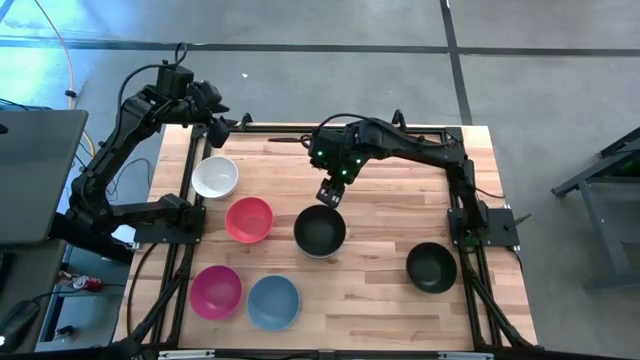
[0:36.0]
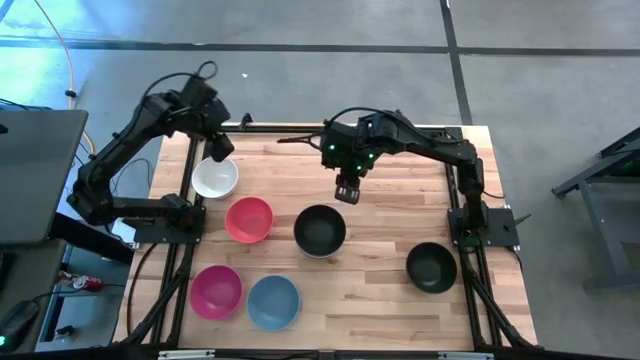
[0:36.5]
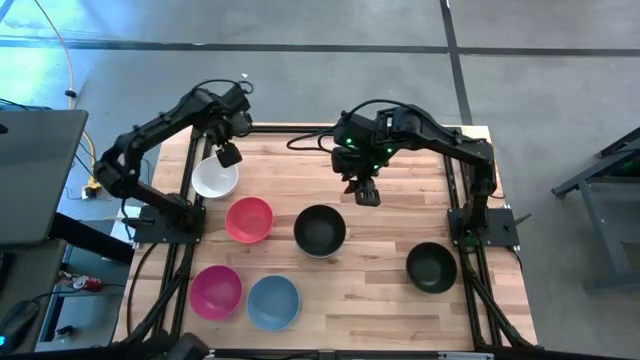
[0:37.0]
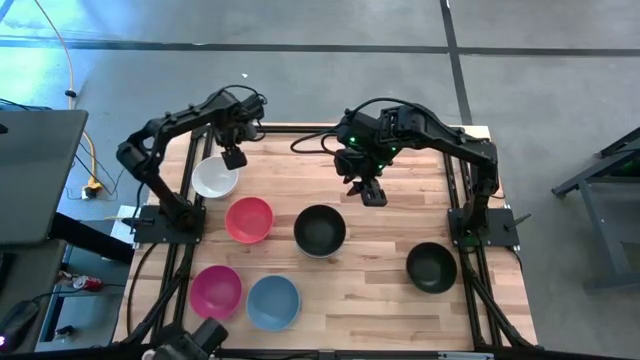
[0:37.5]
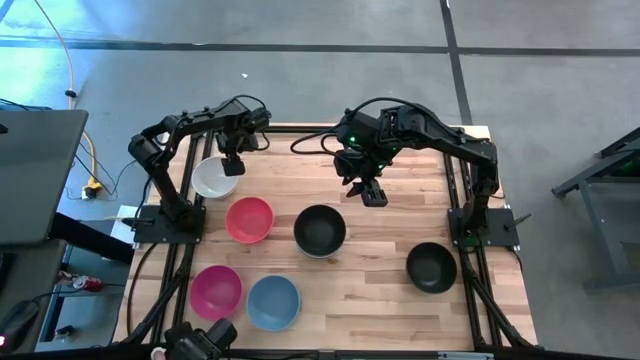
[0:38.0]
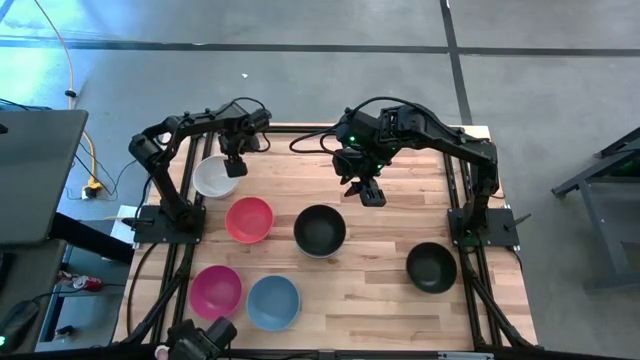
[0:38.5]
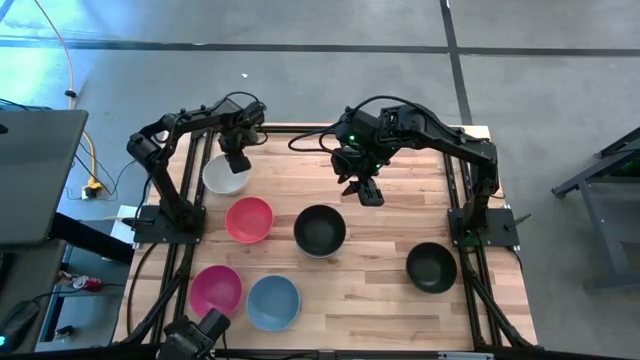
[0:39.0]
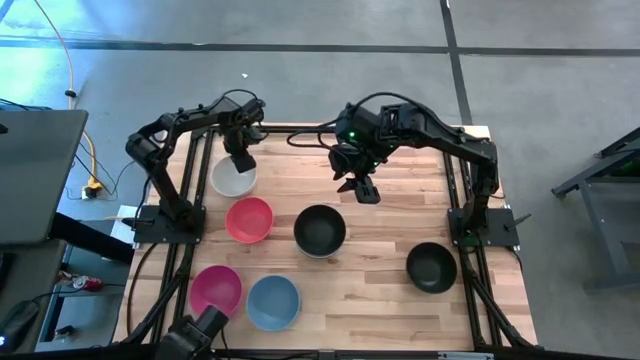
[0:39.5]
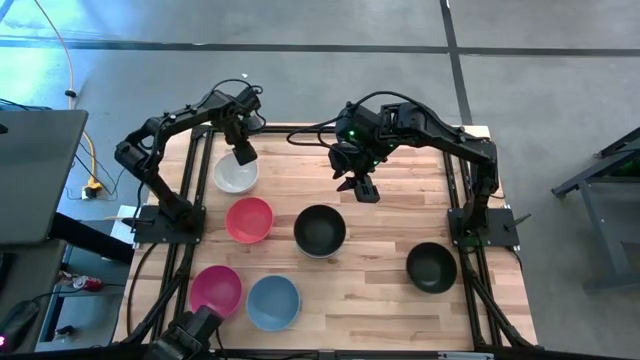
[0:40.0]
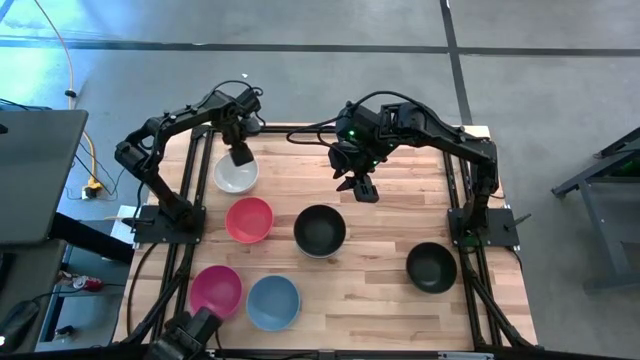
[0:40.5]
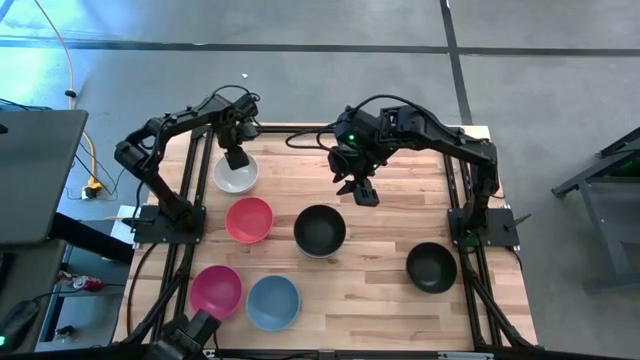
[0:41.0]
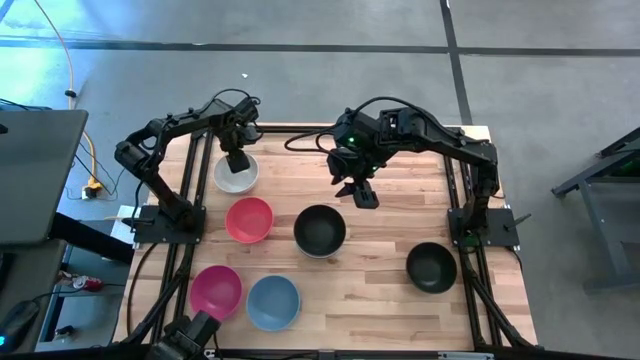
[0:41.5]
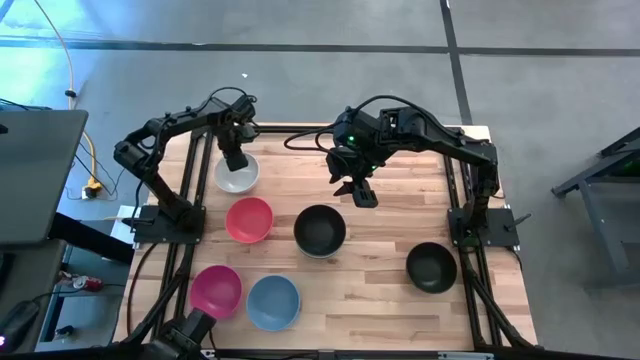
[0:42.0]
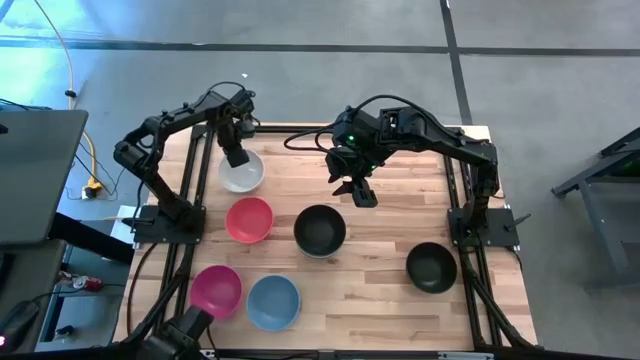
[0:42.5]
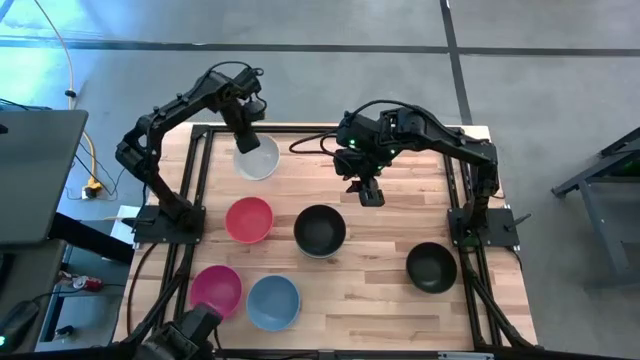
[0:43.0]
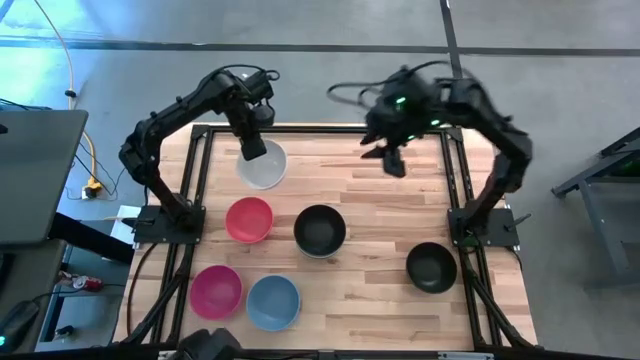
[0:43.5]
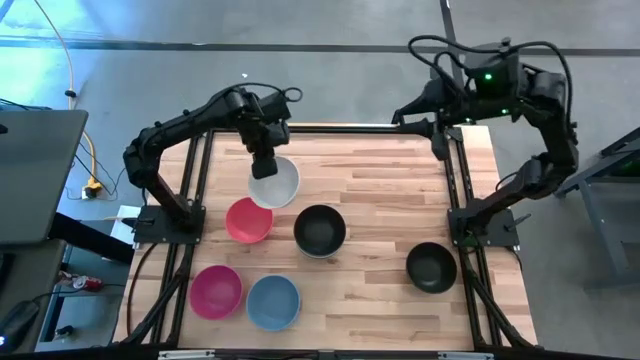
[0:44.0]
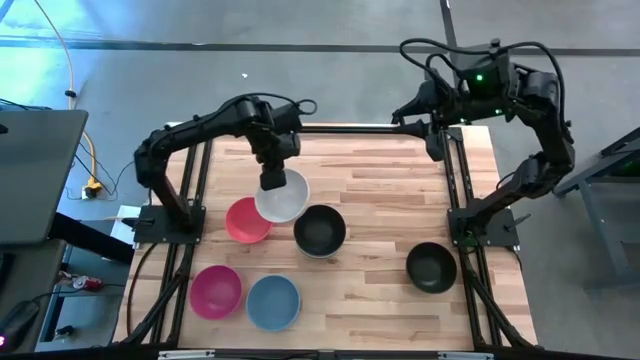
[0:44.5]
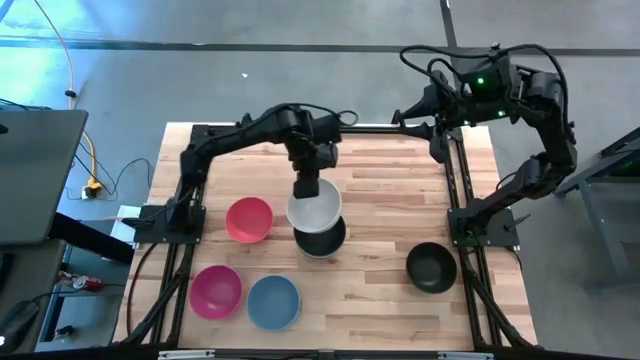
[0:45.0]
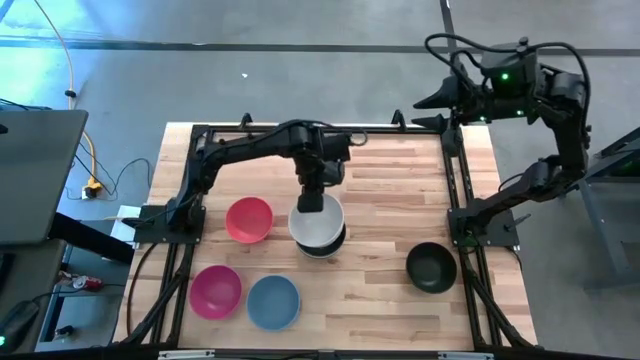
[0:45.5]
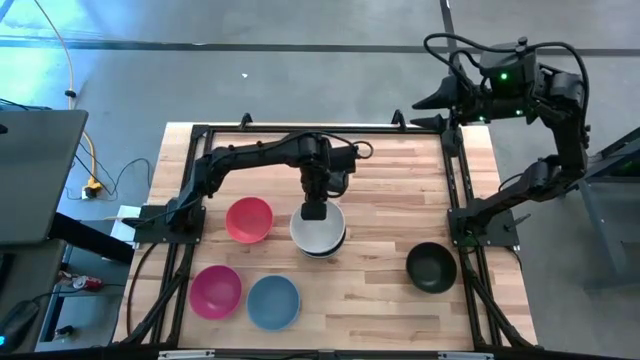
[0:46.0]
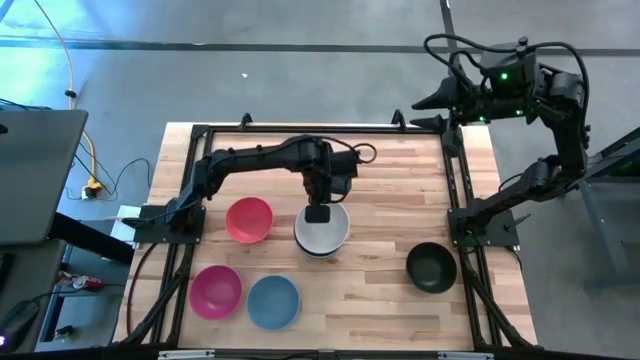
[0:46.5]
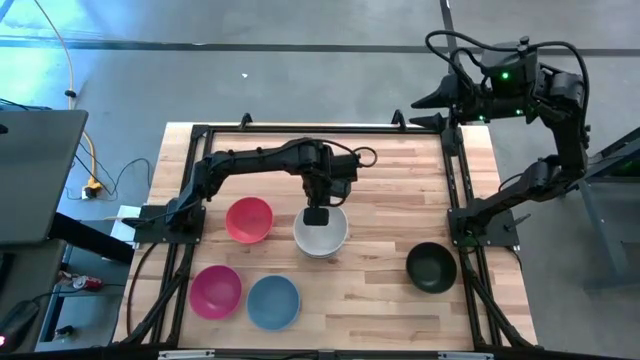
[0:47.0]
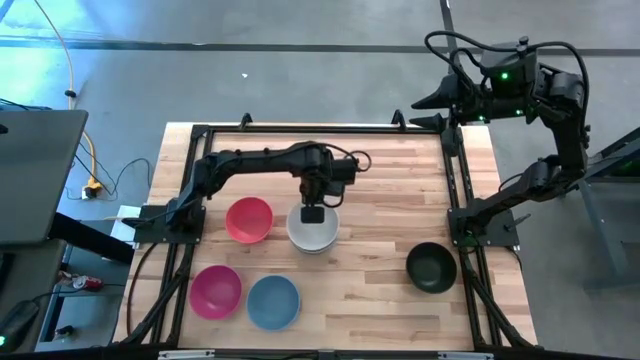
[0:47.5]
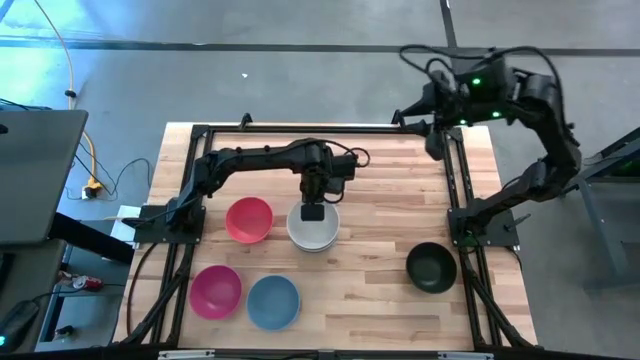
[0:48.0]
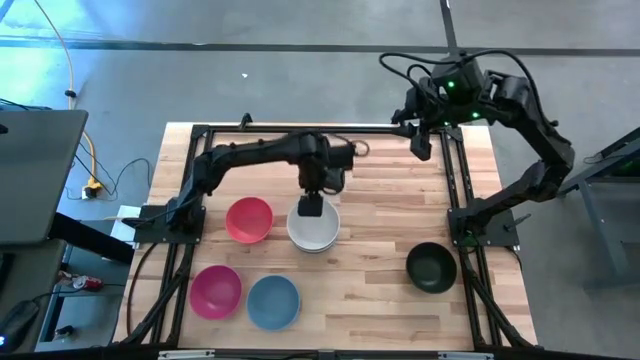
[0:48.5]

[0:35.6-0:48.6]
Task: Nest bowls inside each other
Stack the white bowl on top of the black bowl

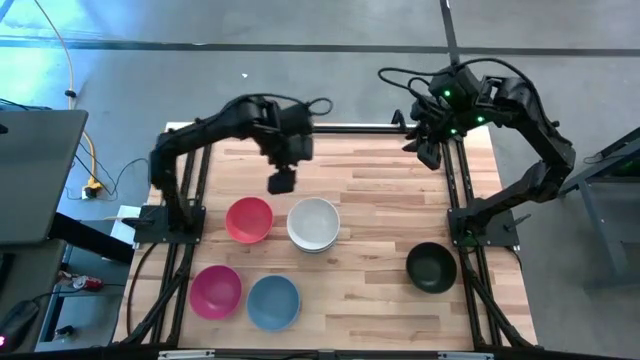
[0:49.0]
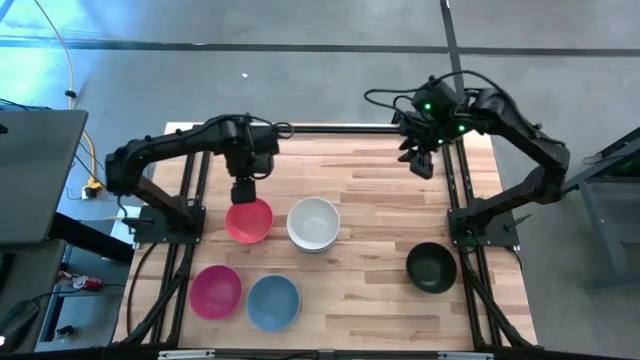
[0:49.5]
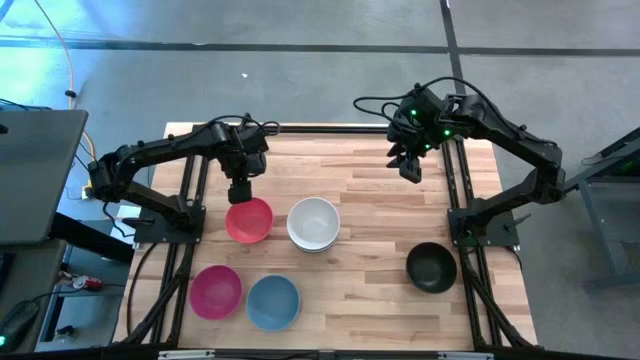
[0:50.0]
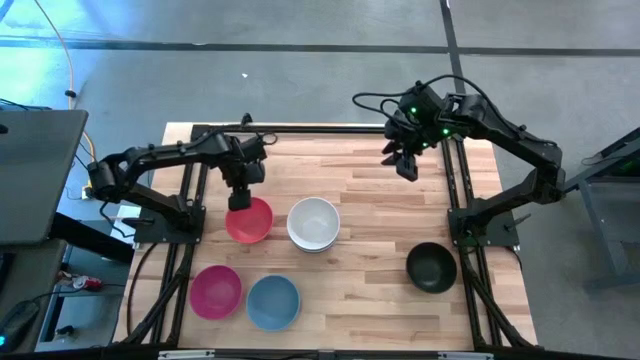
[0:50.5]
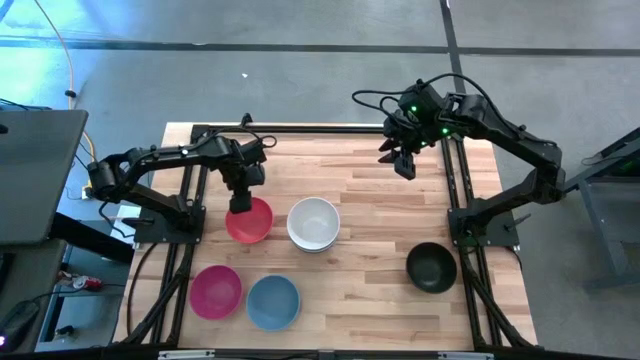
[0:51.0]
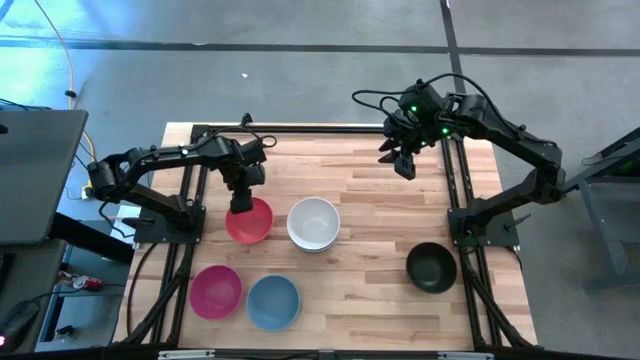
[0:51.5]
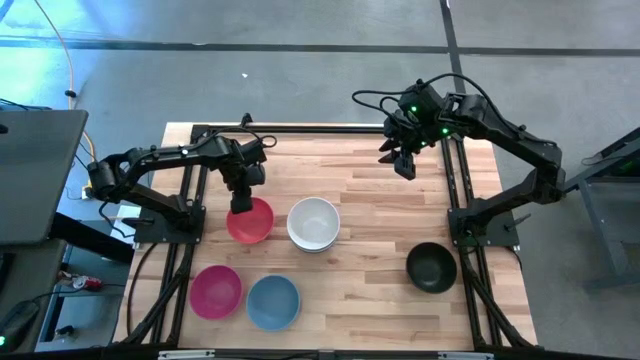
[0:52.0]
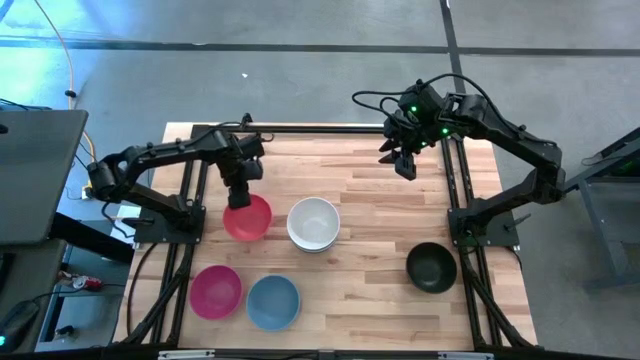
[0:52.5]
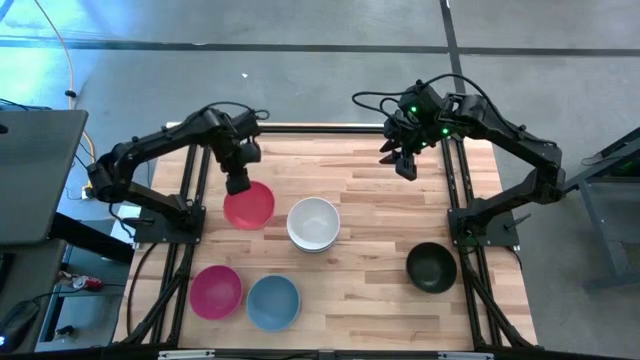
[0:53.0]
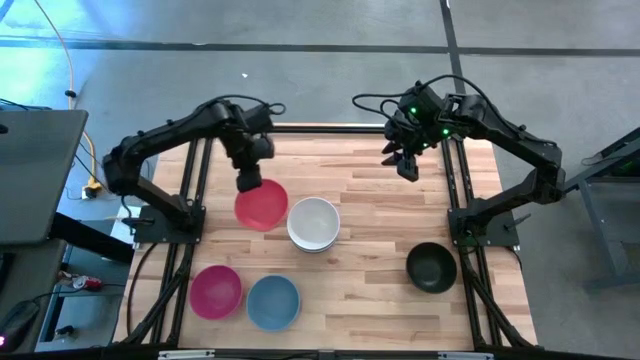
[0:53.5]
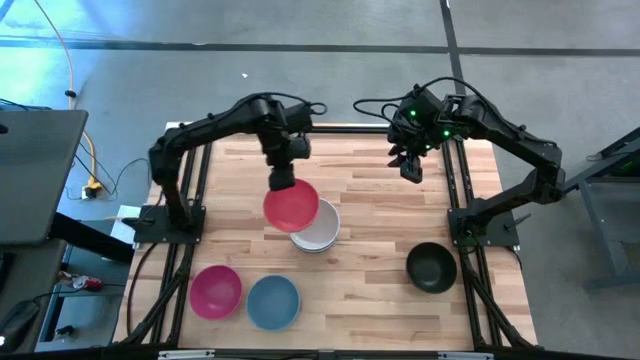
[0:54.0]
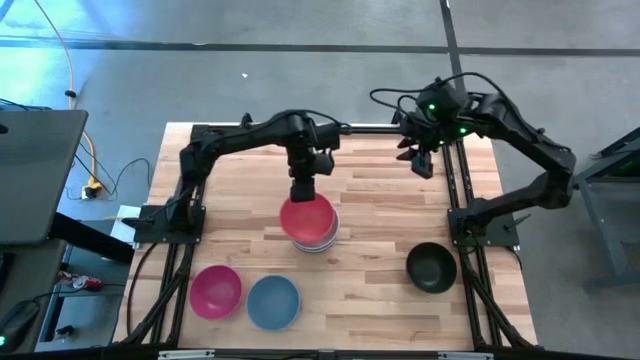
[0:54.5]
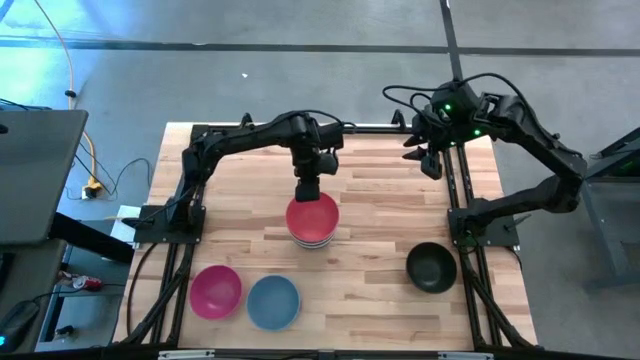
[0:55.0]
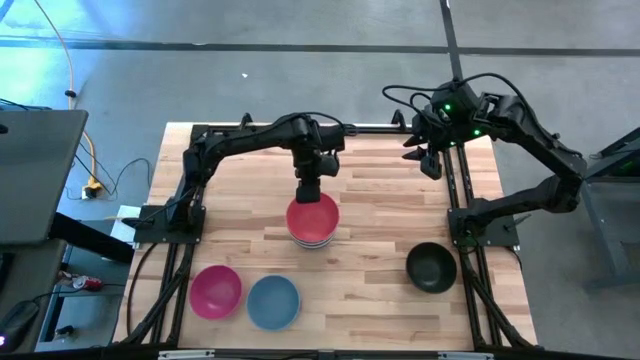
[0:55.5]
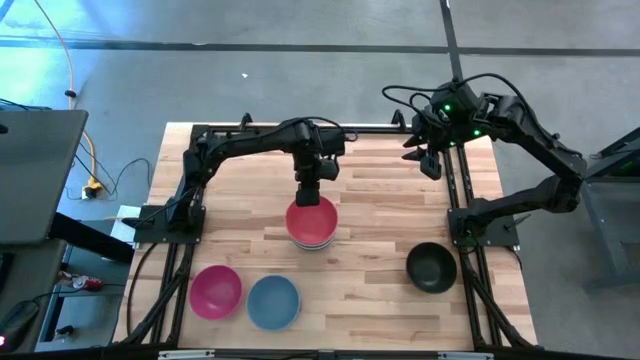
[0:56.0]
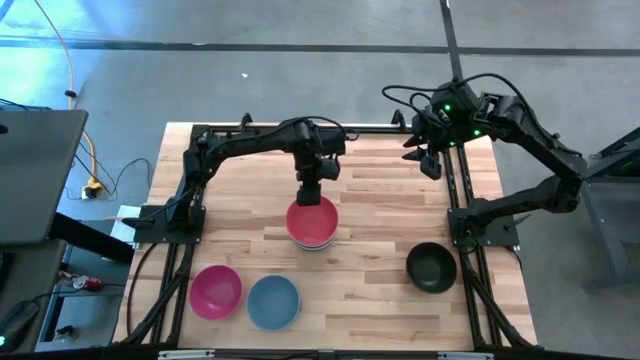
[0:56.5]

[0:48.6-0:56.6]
Stack the orange bowl on top of the white bowl

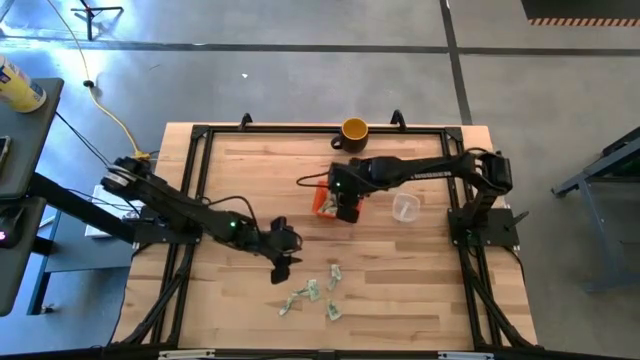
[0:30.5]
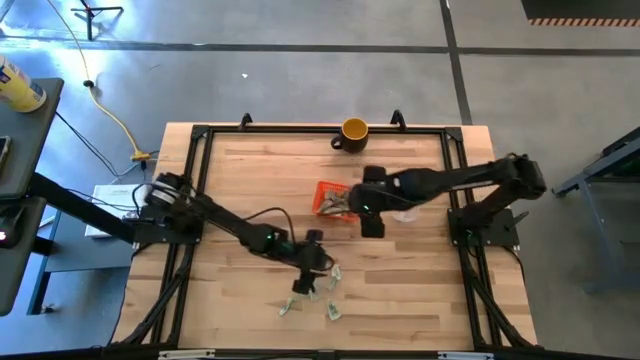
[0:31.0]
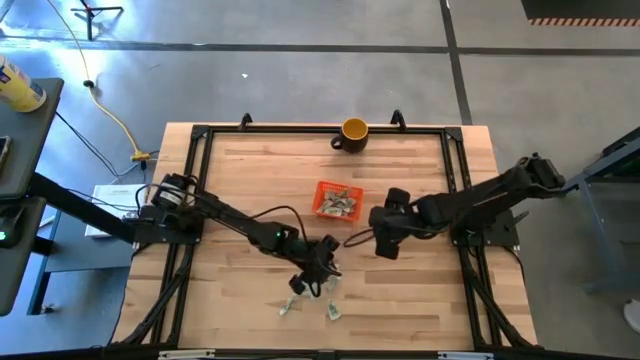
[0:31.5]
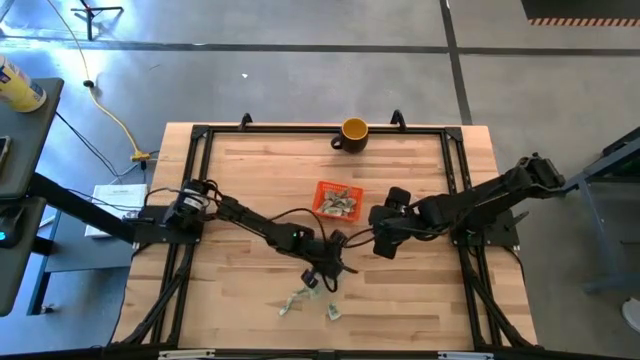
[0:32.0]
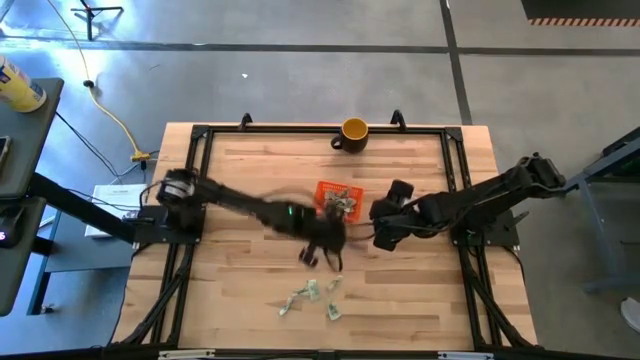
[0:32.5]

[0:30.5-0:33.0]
Task: Pick and place items into bin
Put the white stevia packet into the orange bin
